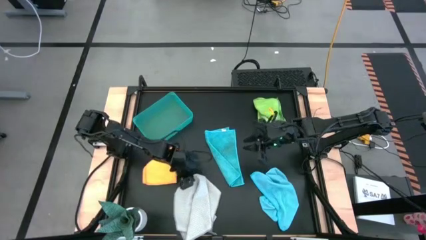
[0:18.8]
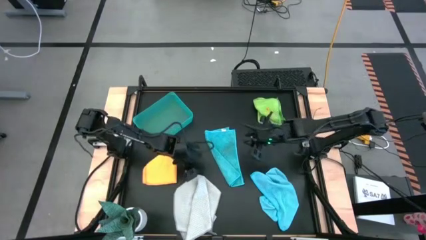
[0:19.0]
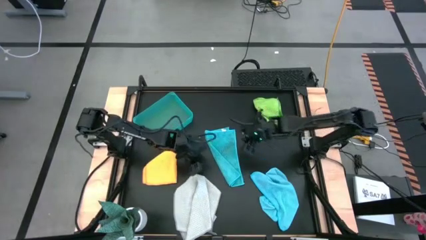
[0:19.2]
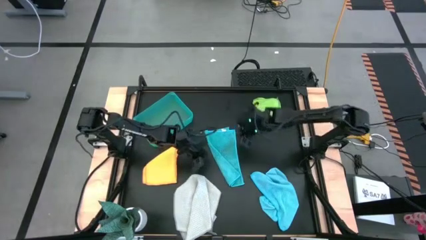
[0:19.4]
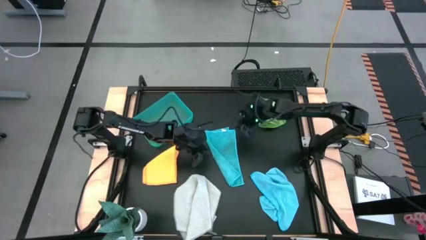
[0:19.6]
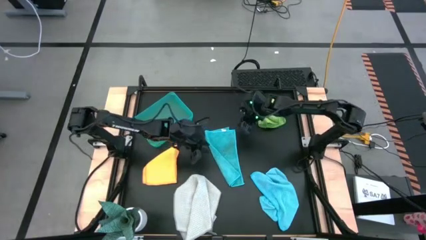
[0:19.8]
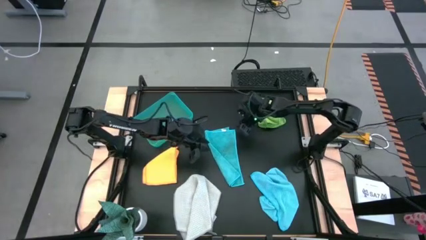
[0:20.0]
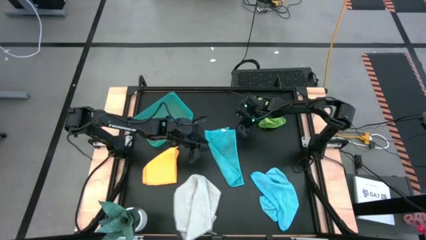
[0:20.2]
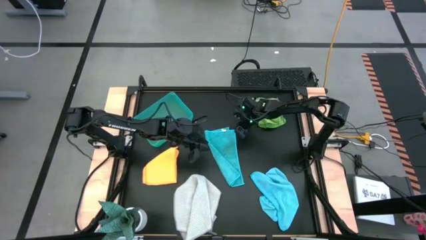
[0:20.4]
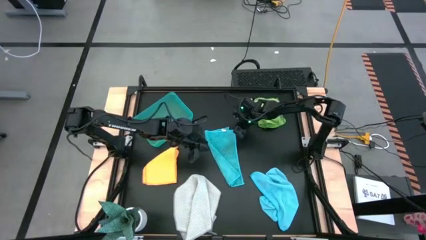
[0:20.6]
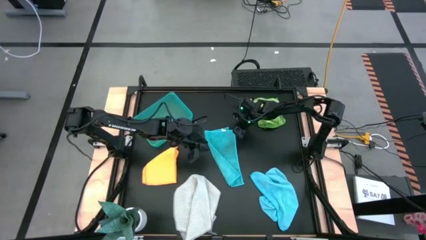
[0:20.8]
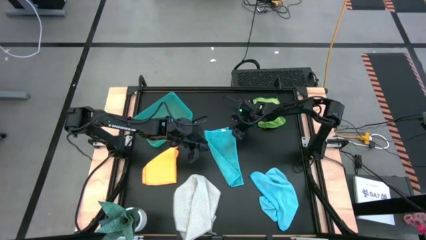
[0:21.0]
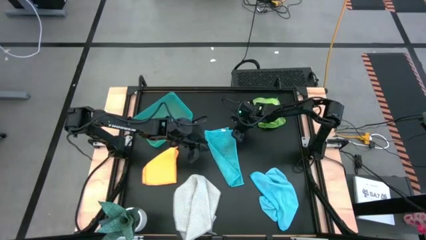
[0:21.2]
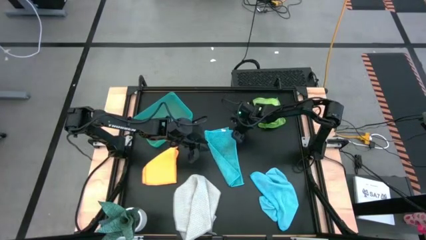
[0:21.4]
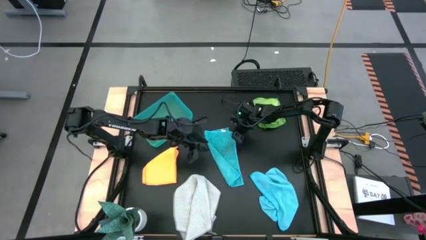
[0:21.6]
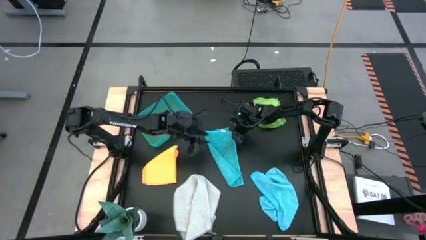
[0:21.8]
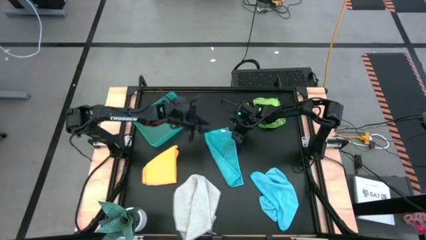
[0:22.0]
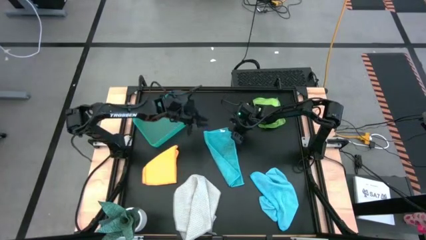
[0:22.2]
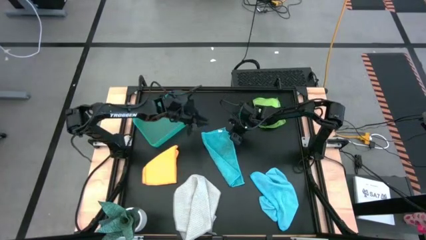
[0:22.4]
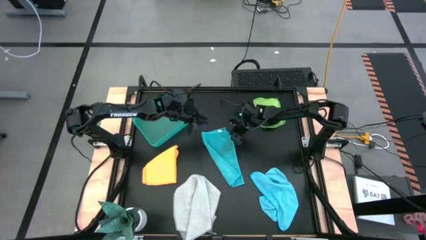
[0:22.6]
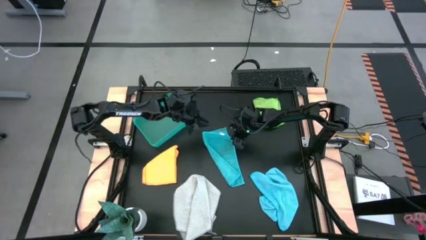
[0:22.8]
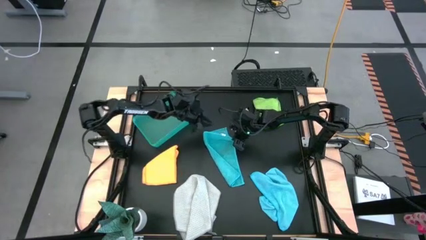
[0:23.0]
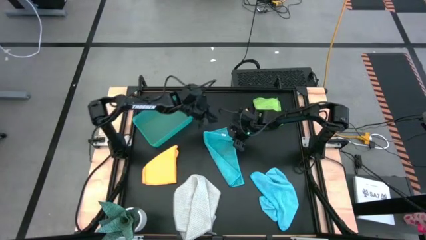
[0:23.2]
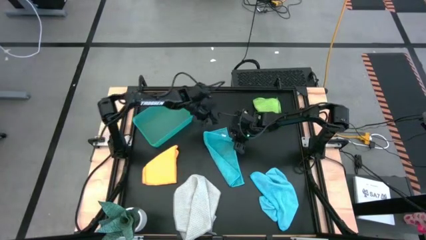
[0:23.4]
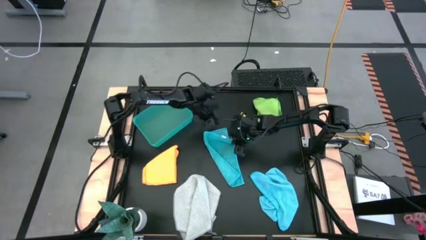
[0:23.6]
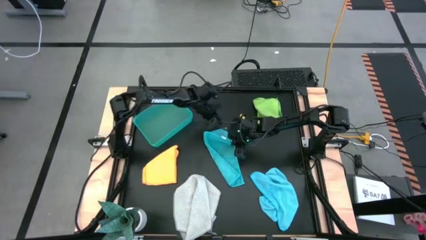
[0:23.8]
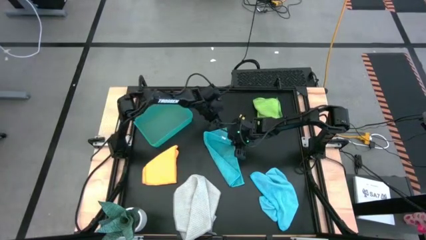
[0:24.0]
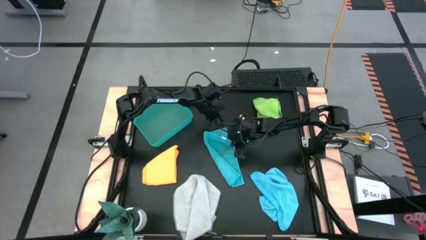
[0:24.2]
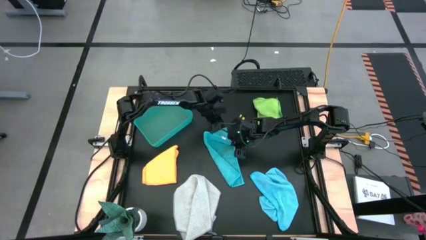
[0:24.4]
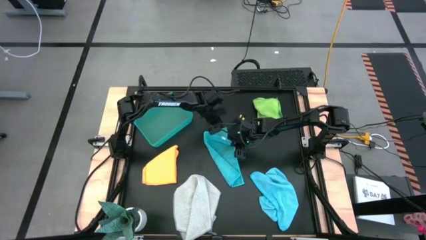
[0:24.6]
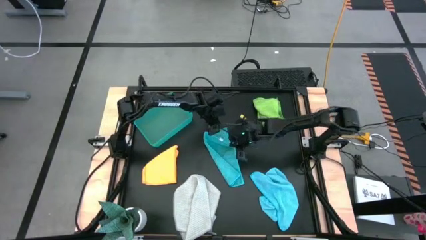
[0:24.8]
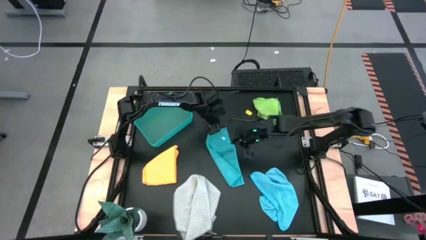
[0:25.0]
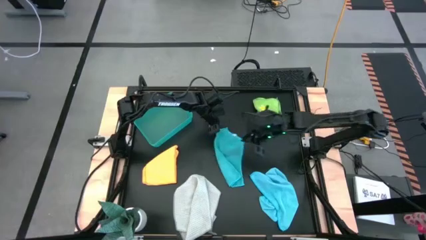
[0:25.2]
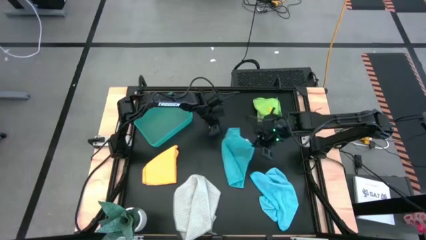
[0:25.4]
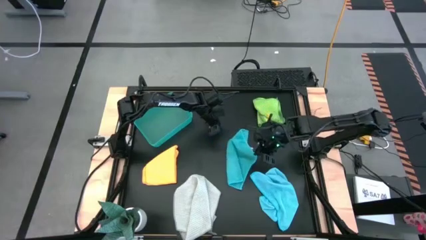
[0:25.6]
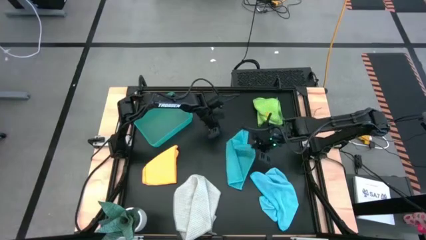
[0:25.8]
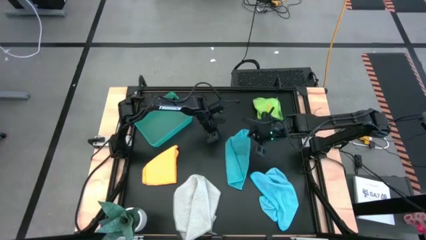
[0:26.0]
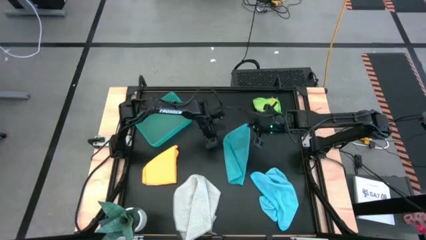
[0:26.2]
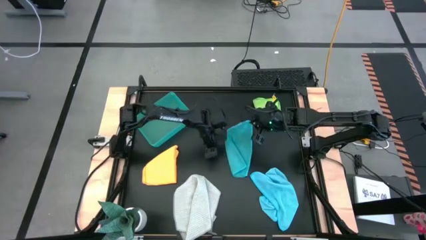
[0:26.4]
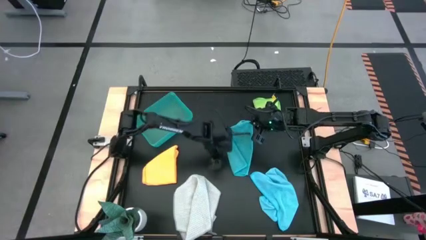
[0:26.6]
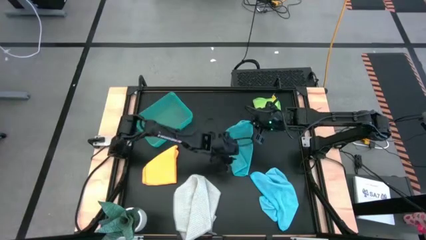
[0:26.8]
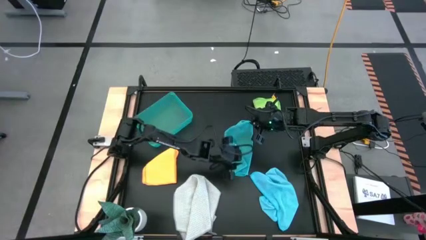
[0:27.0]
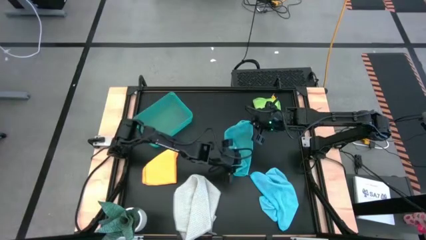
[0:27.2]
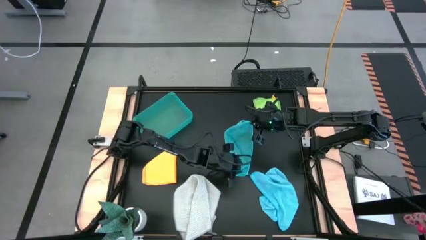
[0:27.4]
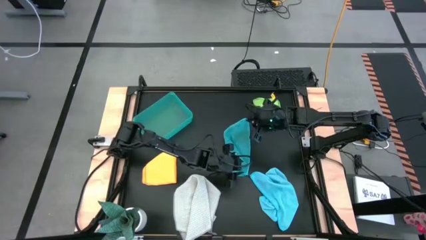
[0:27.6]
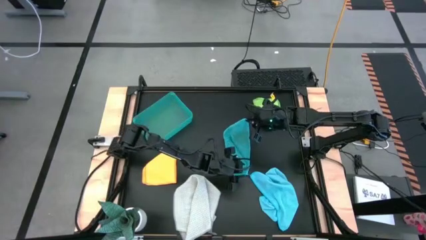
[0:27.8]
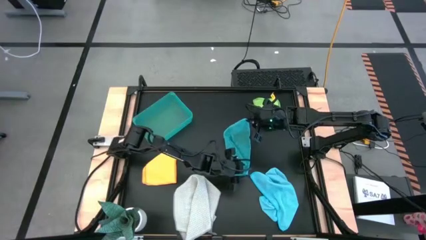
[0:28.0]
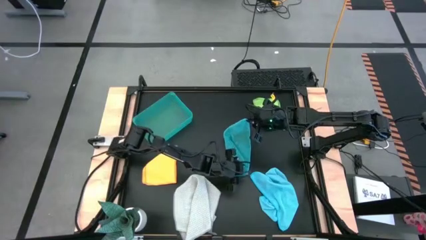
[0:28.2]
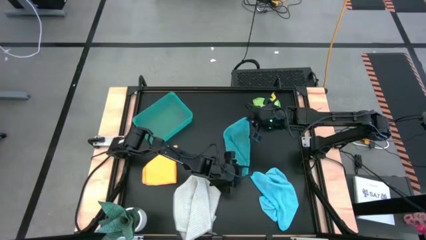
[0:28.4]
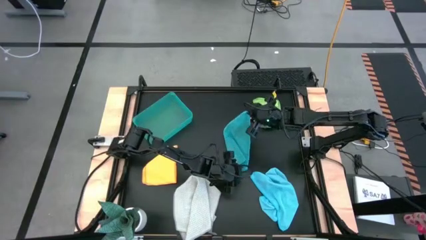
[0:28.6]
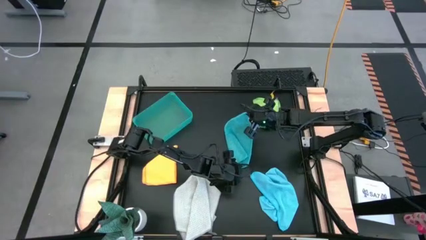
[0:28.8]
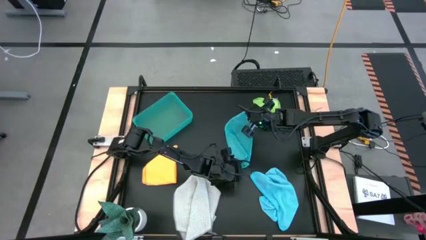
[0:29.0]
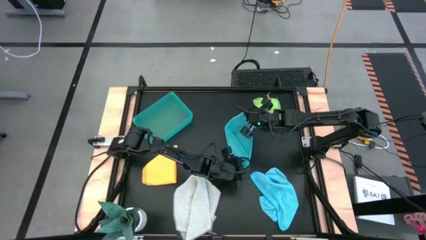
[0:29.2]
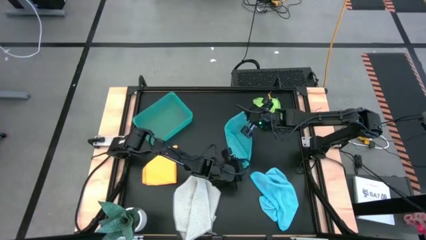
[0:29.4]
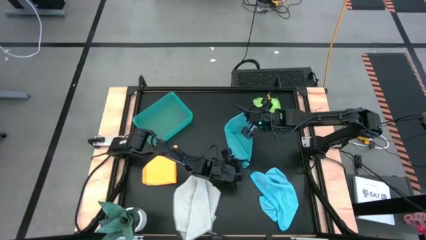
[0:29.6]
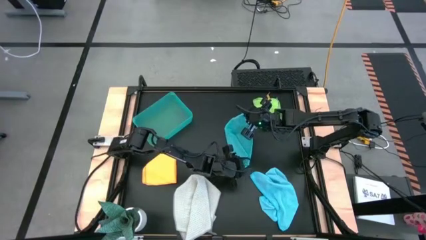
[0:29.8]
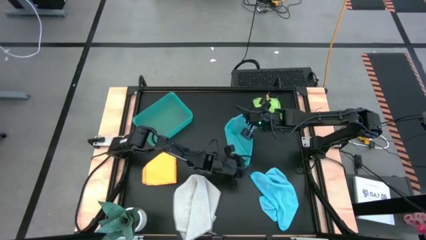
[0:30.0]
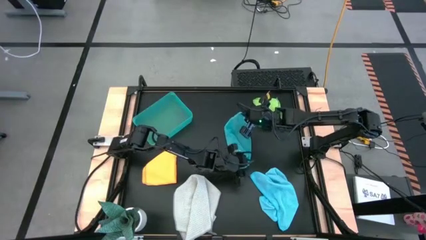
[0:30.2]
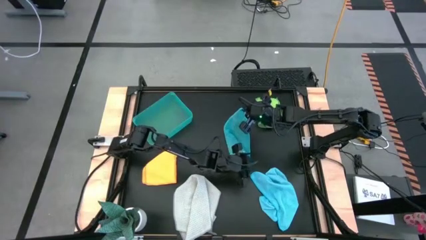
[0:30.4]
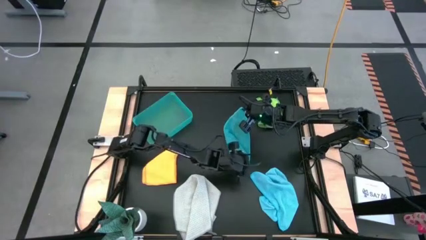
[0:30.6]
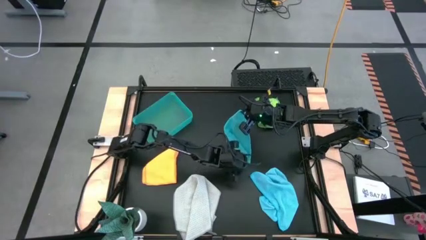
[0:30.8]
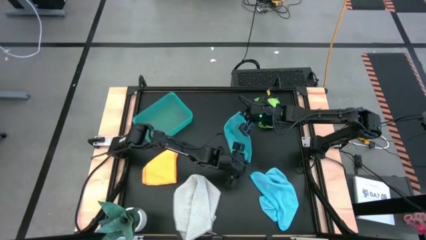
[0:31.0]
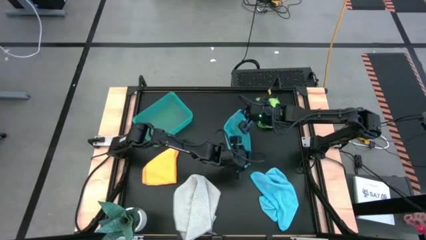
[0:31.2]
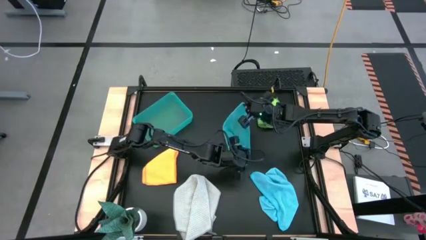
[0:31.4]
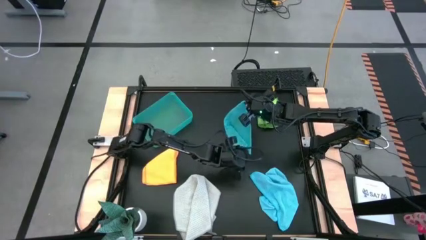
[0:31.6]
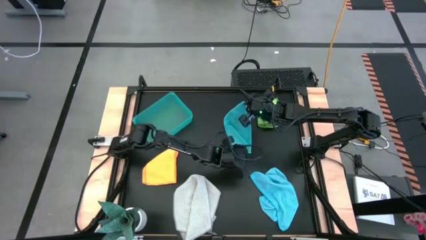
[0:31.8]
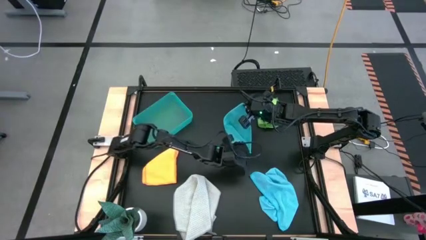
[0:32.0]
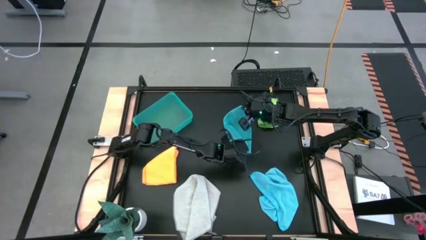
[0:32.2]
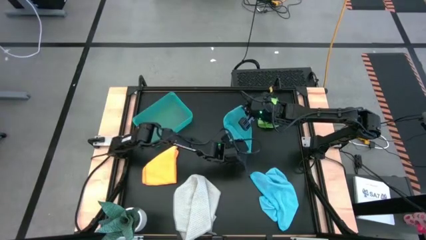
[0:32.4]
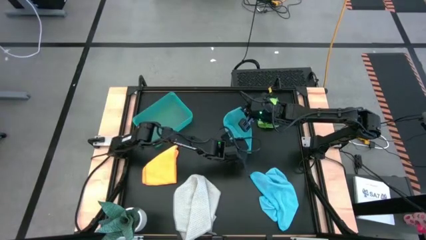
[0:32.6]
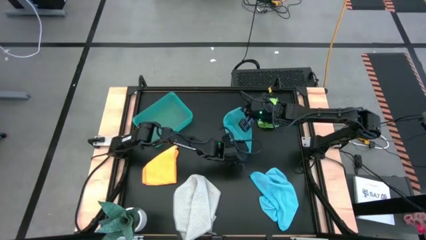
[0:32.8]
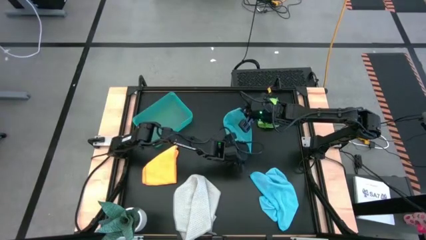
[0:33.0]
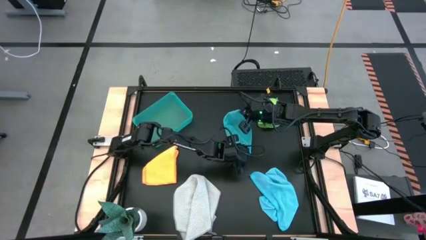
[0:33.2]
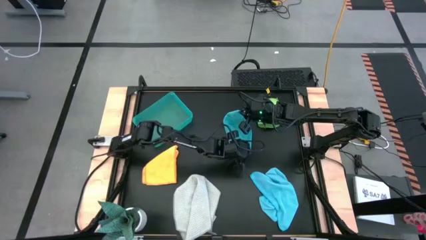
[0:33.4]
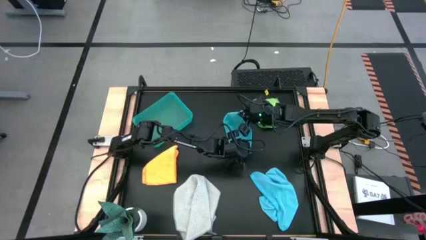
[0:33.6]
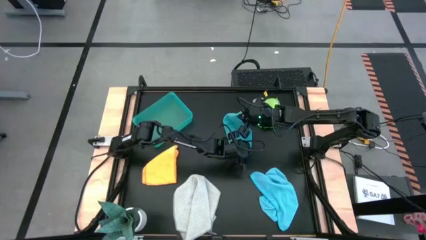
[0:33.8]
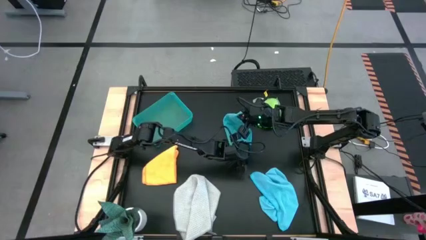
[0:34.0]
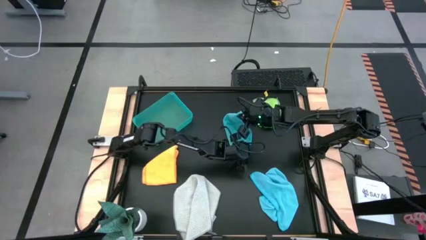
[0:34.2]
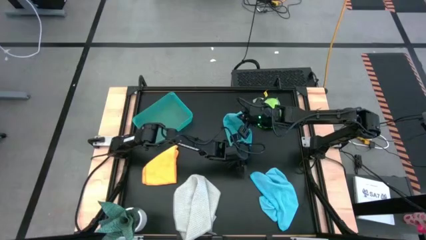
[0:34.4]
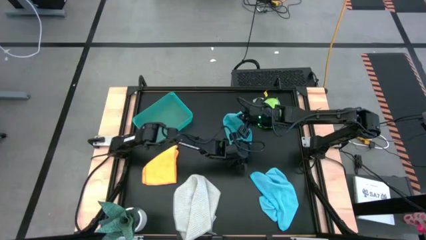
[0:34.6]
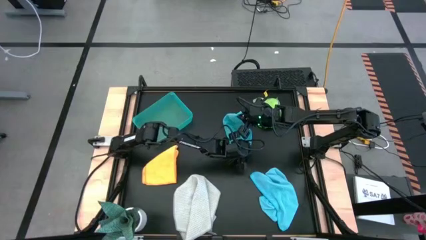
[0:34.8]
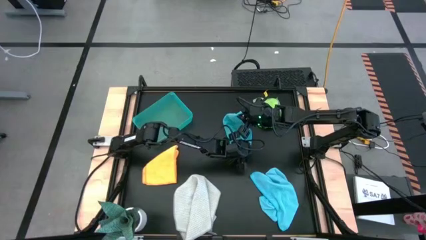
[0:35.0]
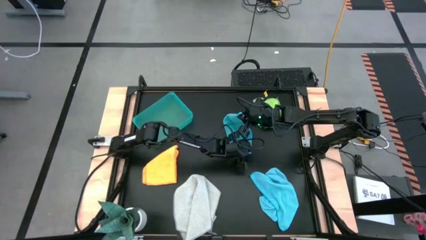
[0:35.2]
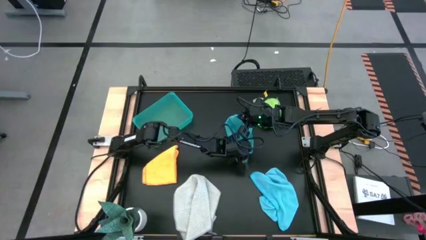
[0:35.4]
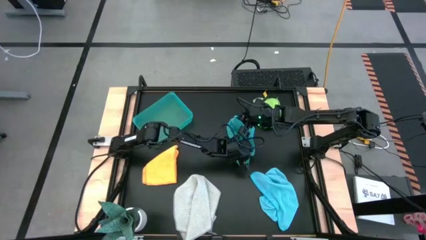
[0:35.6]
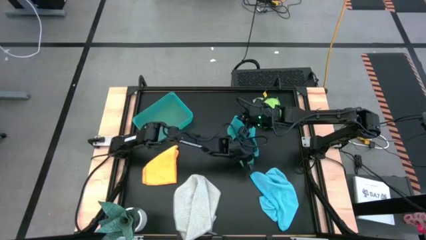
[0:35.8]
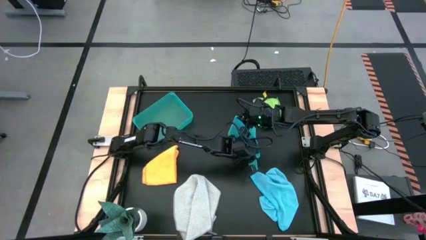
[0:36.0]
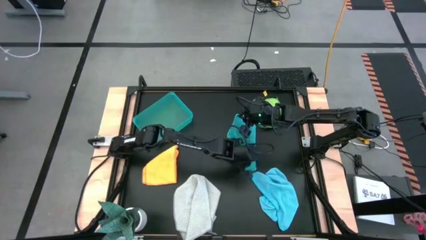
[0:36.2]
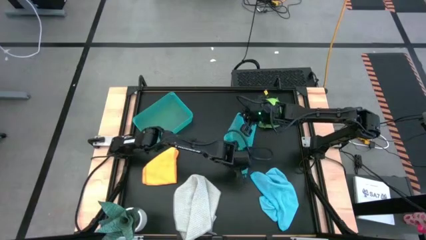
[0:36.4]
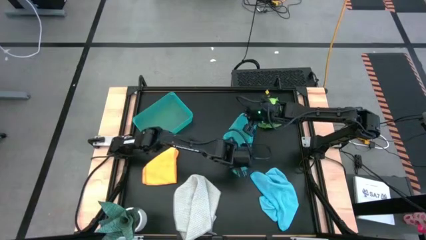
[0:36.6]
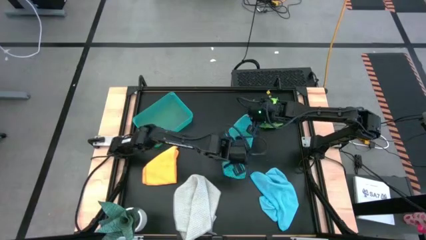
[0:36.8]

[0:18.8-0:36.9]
Task: Fold microfiber towels
Fold the top blue microfiber towel
